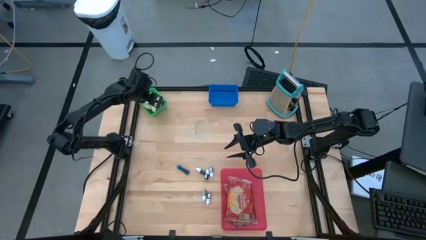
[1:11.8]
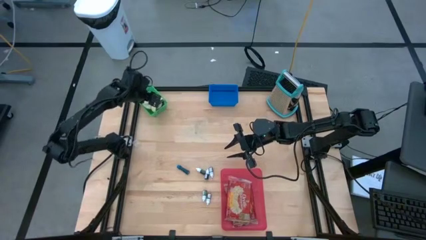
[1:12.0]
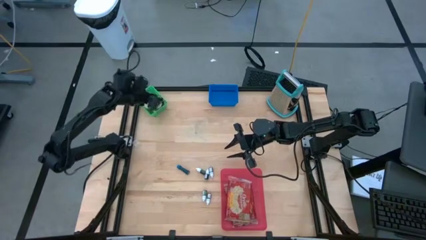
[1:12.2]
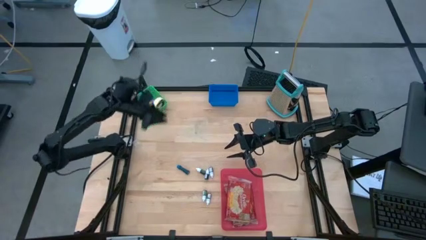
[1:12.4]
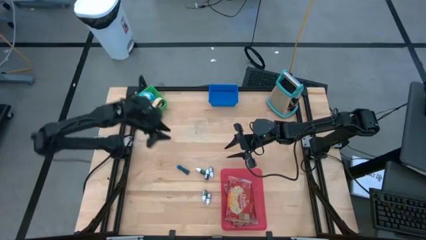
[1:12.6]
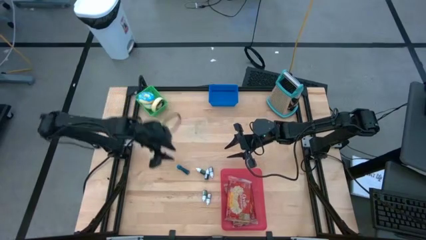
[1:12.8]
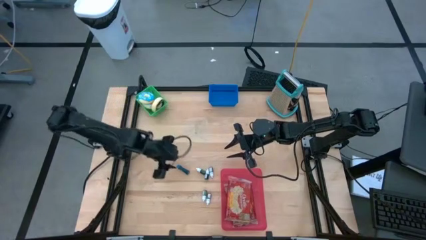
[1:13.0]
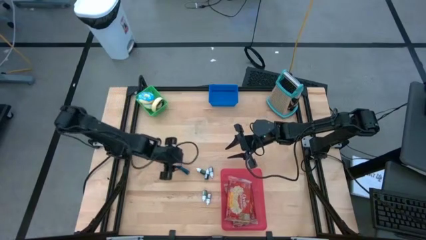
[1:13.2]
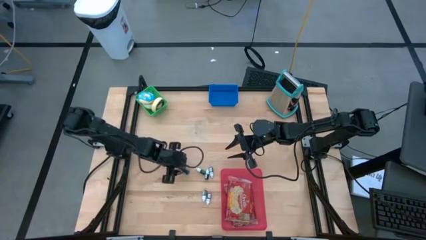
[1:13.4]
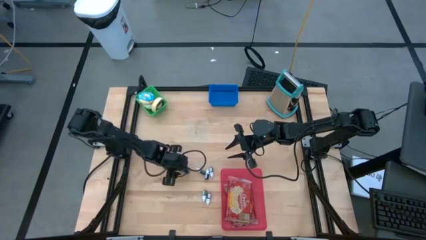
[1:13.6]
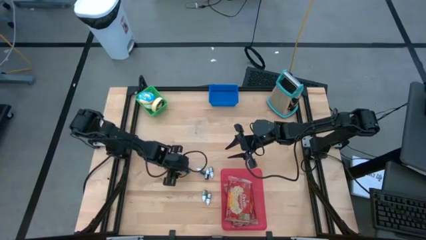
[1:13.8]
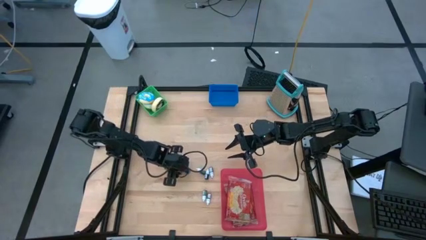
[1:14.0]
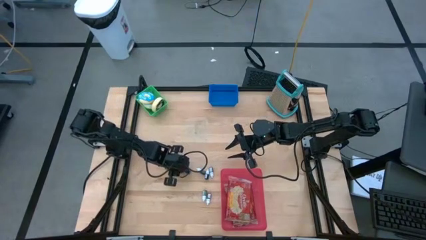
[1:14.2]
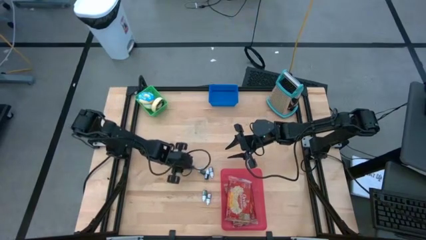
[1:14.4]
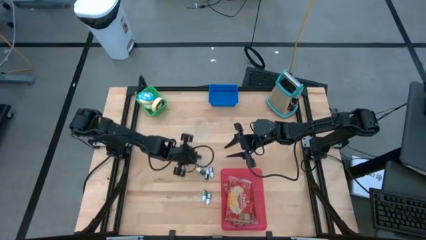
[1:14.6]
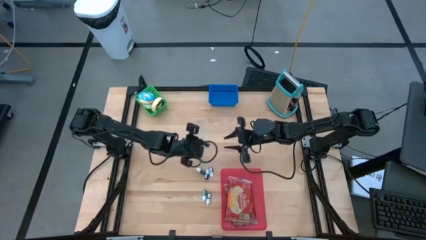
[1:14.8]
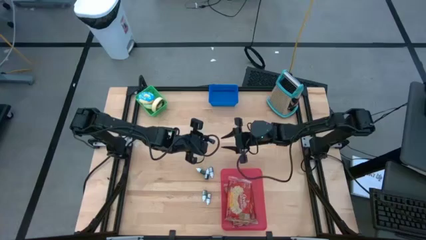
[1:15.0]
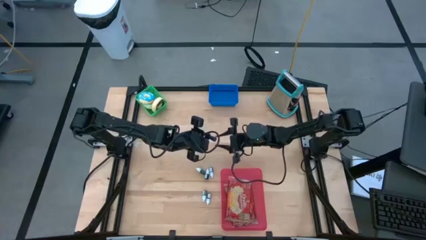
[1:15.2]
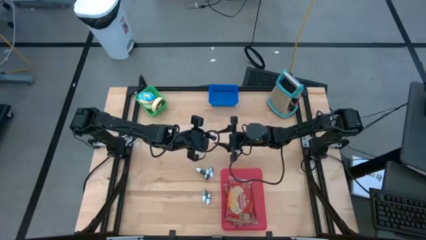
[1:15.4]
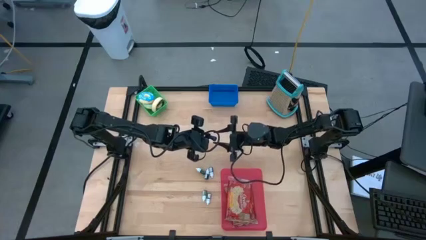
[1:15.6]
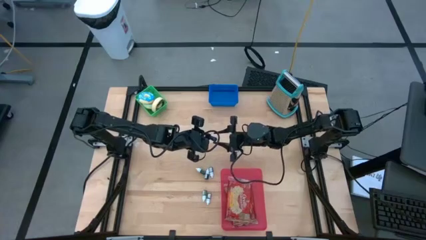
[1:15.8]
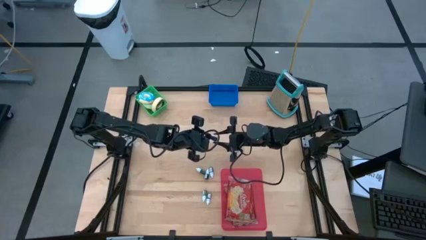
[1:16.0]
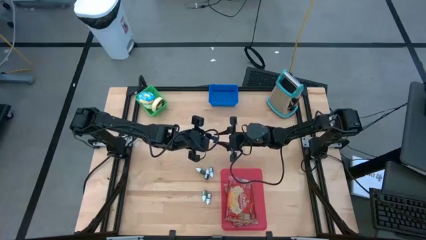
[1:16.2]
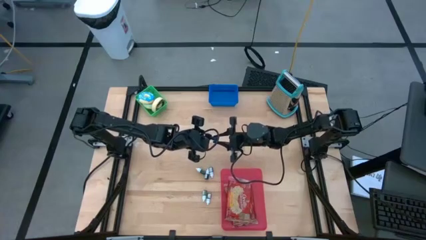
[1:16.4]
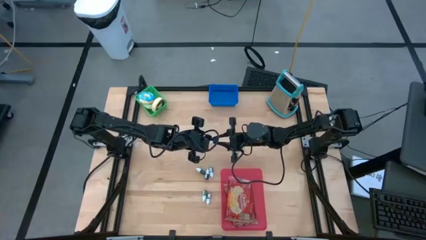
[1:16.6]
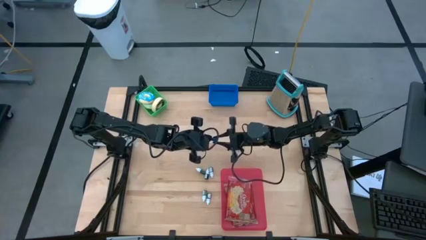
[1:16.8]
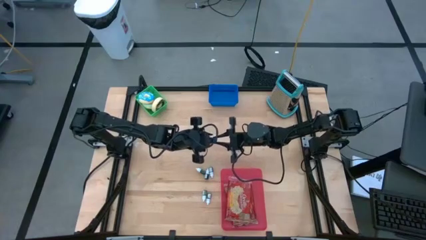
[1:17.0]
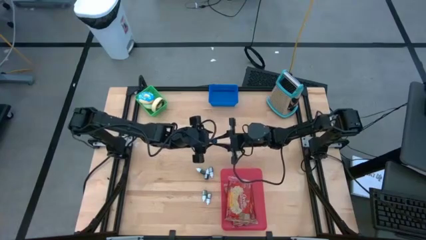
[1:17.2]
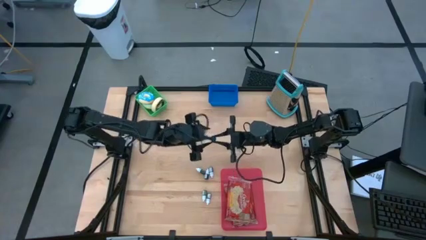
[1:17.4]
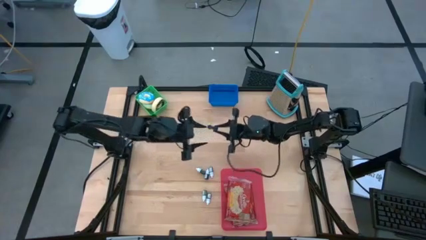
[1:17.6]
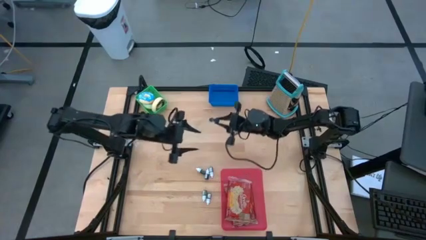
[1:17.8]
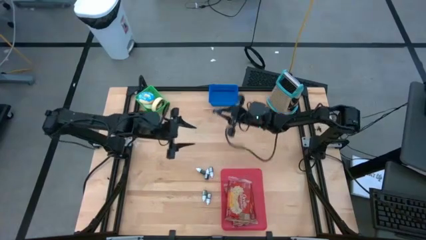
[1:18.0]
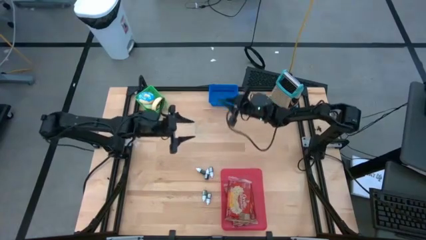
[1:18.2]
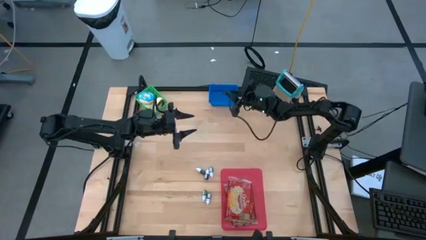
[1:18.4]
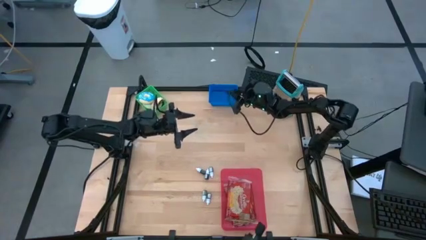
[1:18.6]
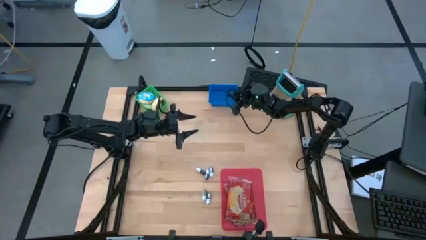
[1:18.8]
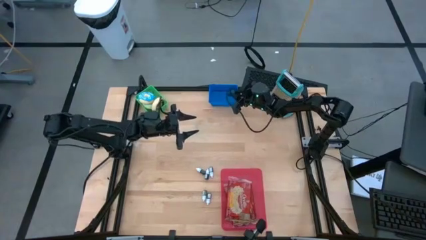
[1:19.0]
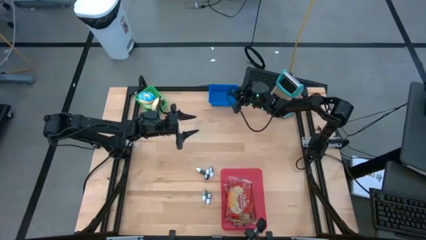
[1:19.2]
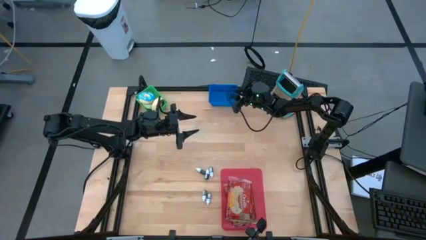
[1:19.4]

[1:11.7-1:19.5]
Put the left blue food coloring into the blue bin

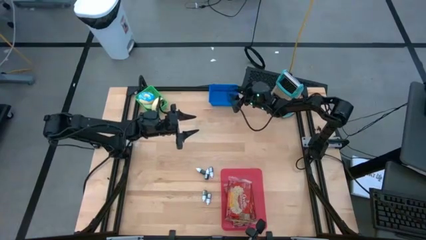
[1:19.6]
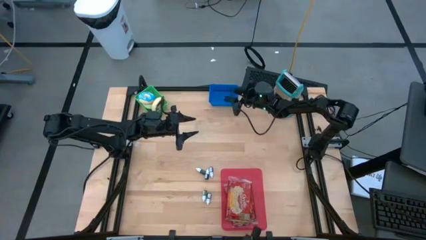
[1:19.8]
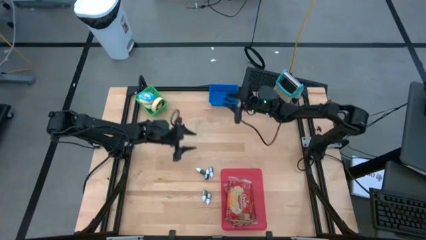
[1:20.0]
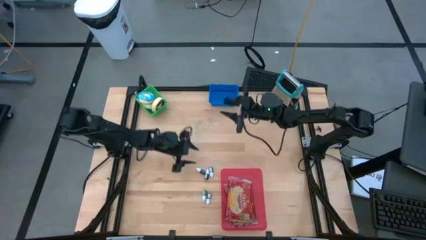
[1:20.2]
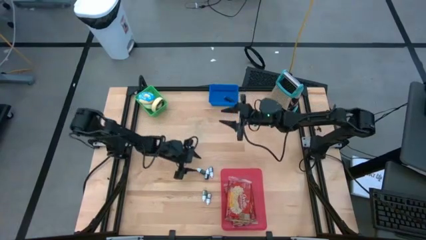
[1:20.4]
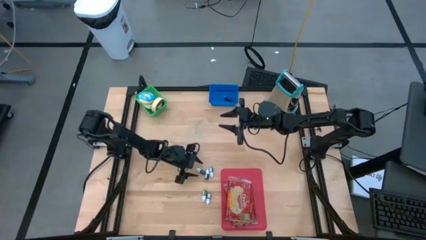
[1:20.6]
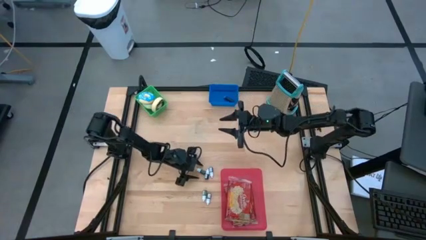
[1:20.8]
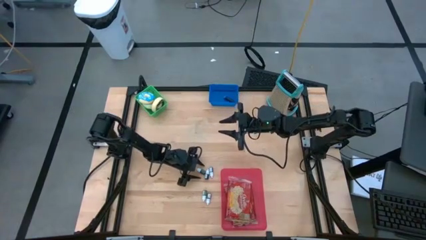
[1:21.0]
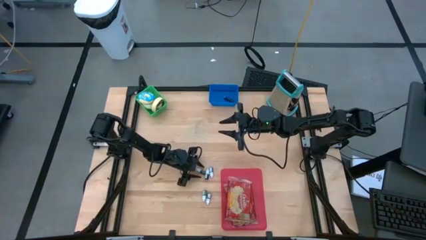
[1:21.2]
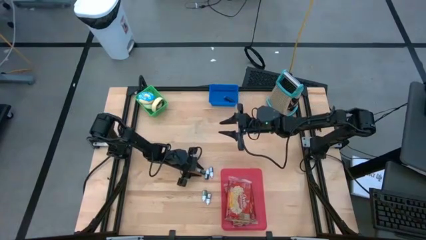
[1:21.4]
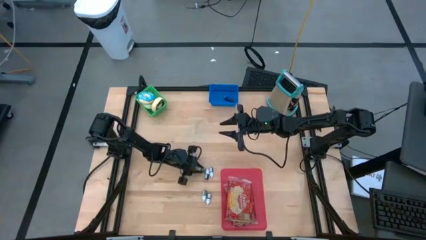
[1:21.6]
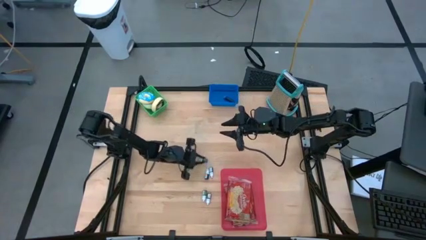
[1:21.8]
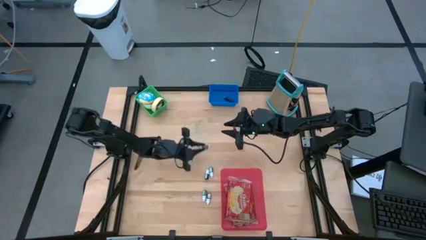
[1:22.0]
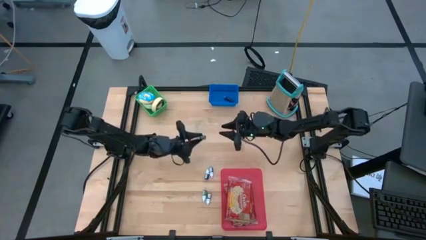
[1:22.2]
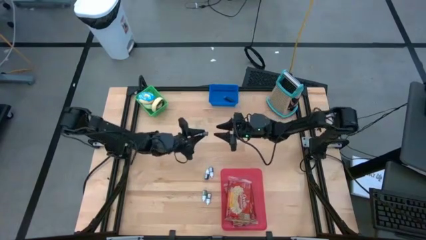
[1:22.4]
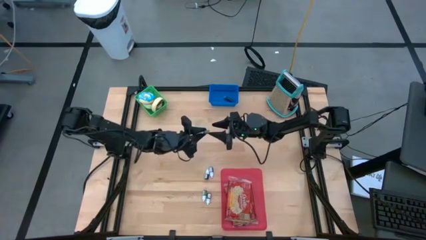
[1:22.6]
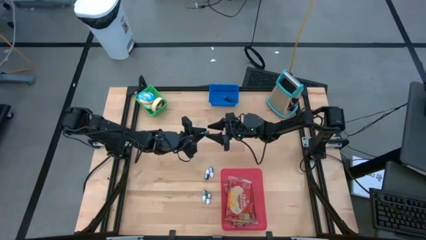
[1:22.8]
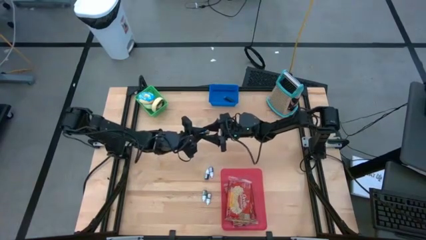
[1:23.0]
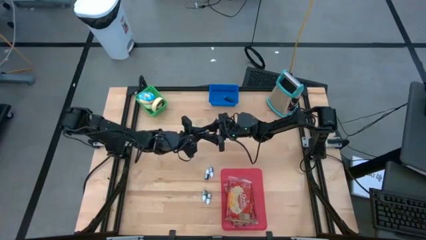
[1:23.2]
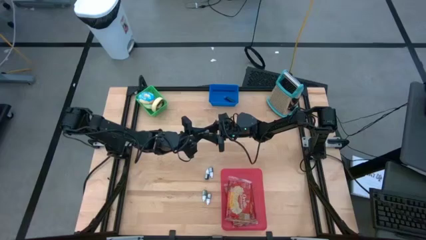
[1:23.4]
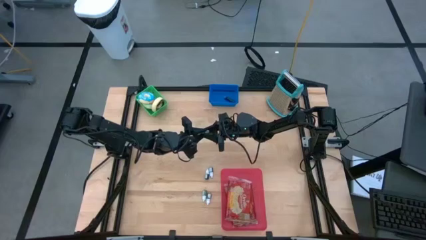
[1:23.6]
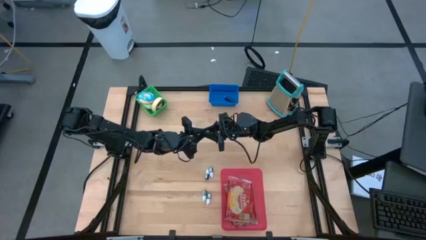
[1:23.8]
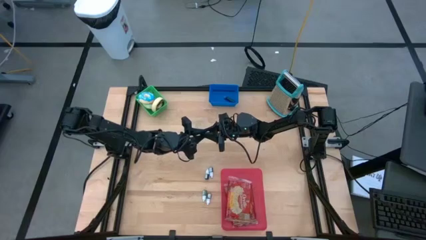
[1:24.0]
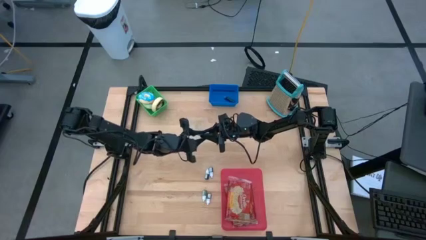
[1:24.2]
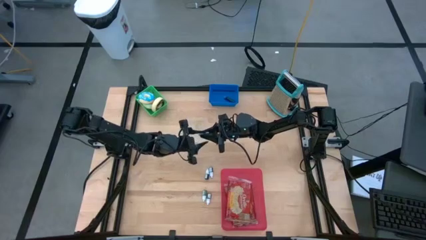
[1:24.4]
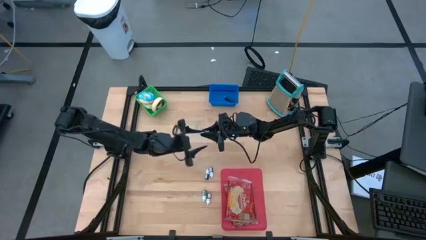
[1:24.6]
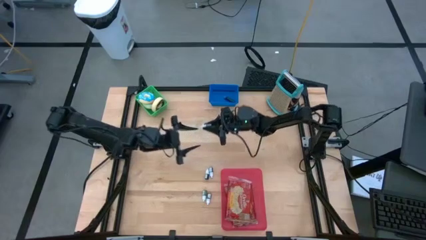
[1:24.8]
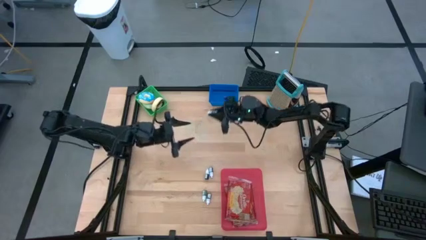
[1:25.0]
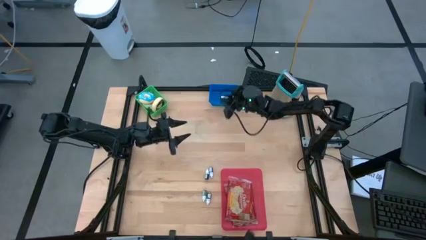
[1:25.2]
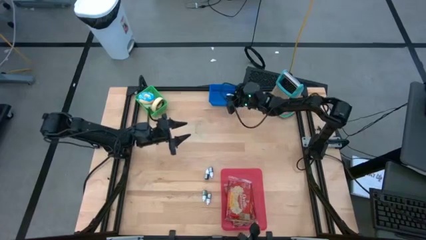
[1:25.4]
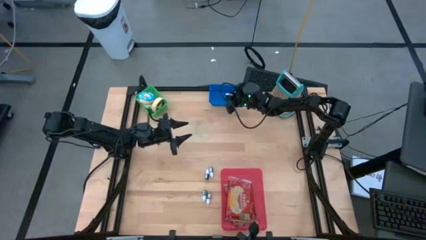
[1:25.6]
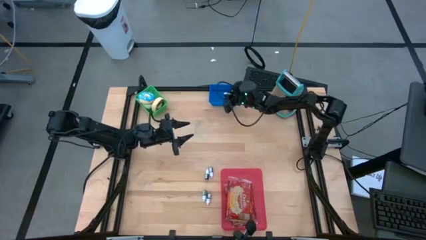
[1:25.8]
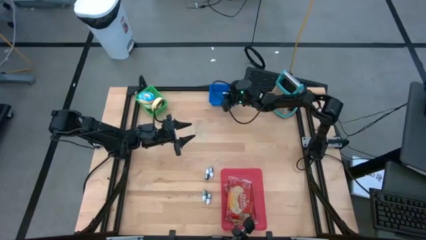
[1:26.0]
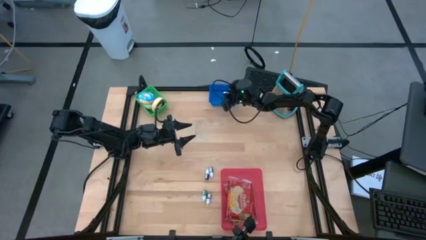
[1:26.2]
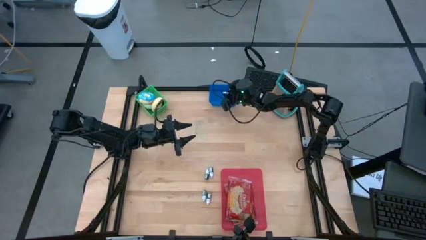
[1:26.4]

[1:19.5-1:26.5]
Put the top green food coloring into the blue bin
